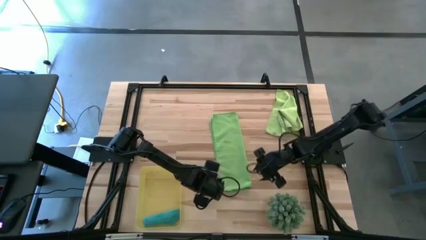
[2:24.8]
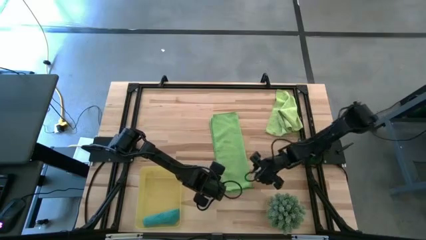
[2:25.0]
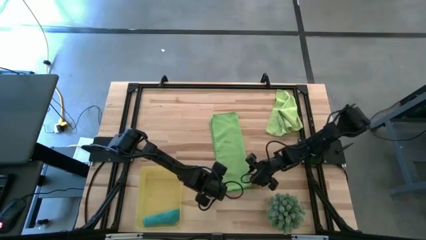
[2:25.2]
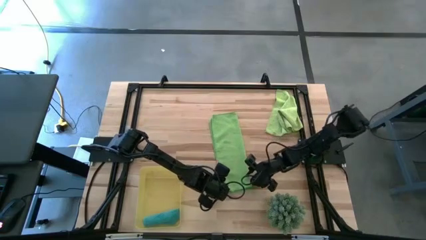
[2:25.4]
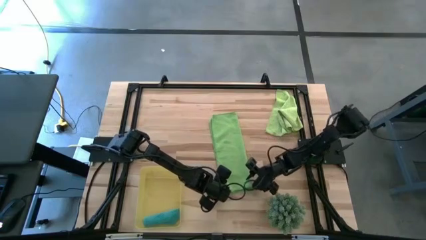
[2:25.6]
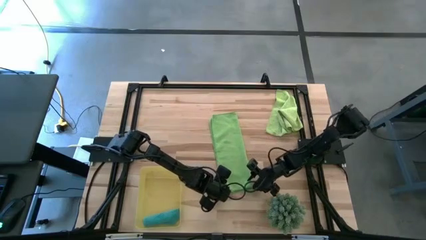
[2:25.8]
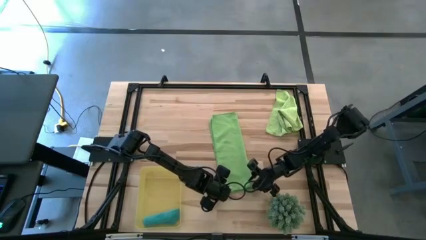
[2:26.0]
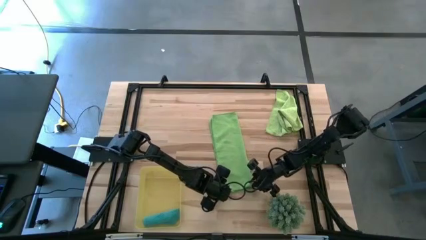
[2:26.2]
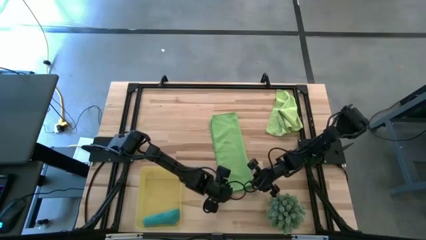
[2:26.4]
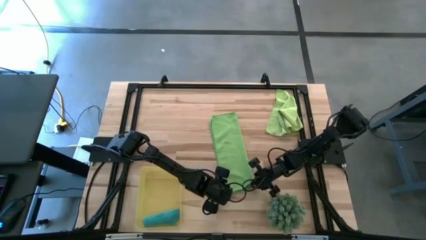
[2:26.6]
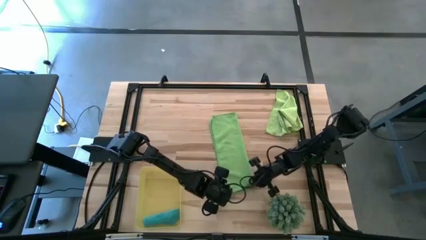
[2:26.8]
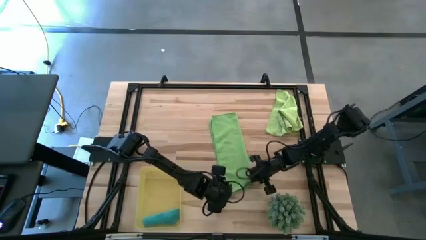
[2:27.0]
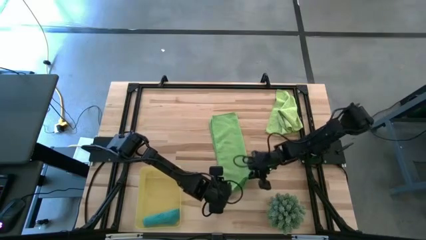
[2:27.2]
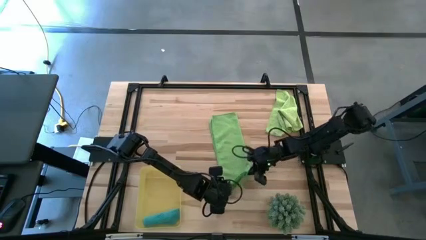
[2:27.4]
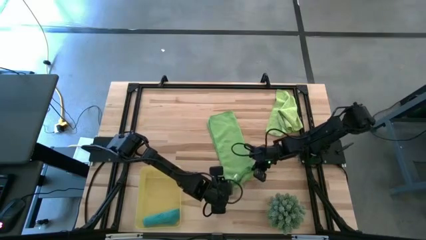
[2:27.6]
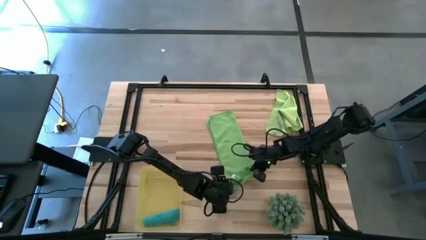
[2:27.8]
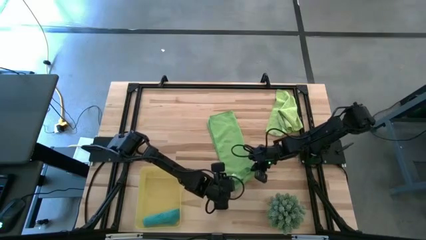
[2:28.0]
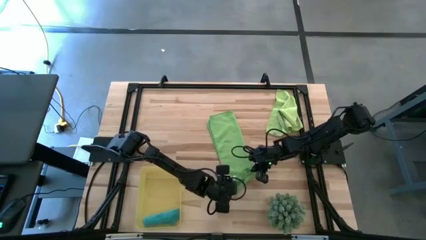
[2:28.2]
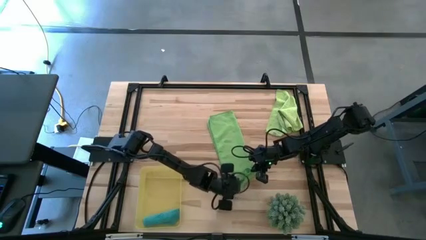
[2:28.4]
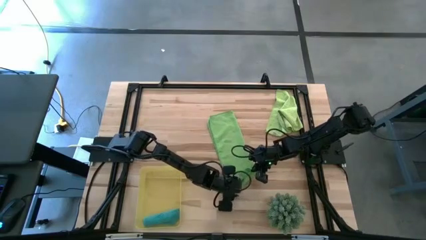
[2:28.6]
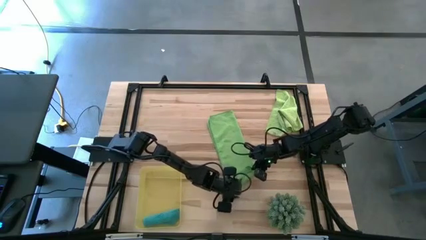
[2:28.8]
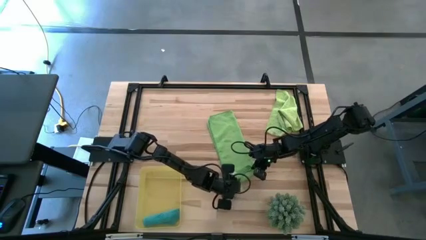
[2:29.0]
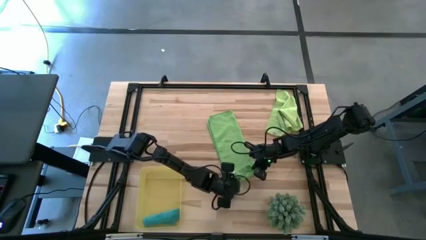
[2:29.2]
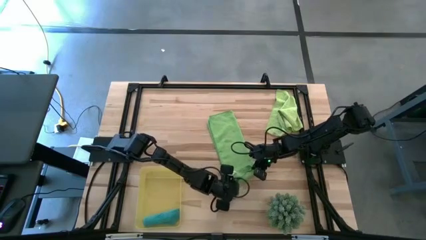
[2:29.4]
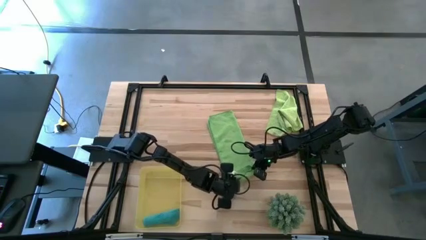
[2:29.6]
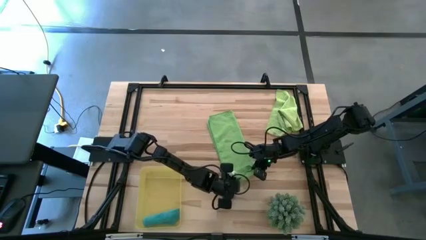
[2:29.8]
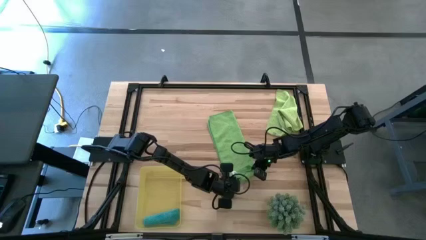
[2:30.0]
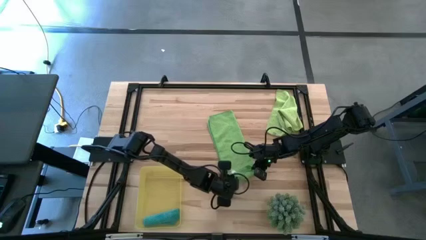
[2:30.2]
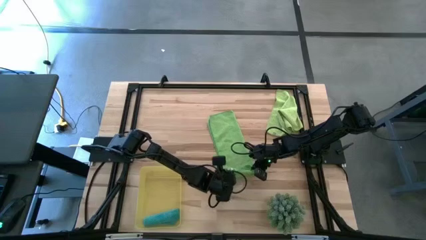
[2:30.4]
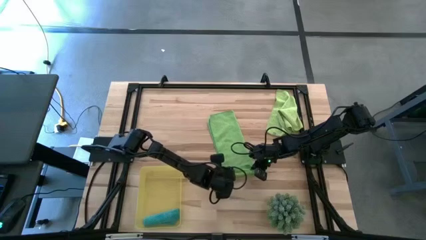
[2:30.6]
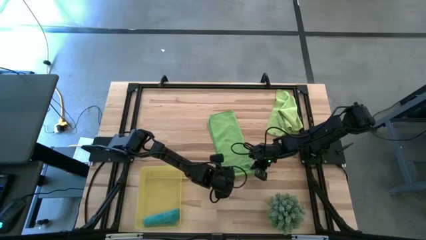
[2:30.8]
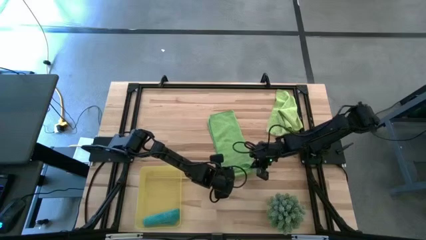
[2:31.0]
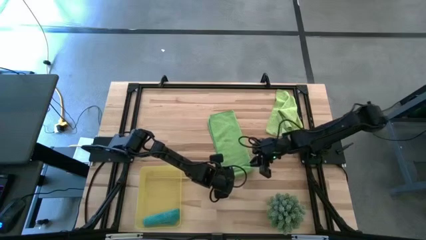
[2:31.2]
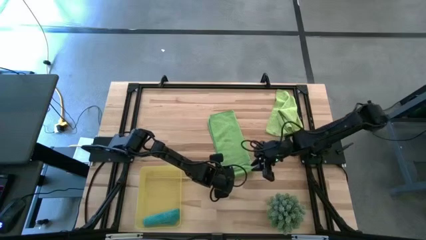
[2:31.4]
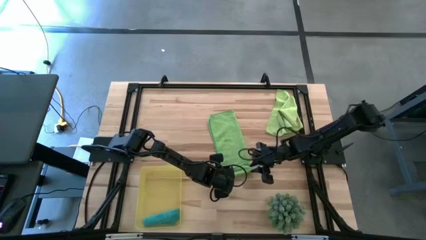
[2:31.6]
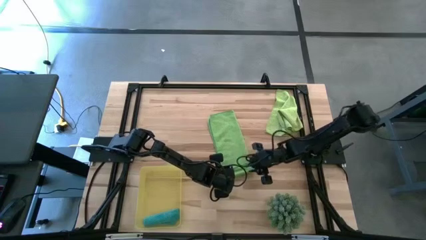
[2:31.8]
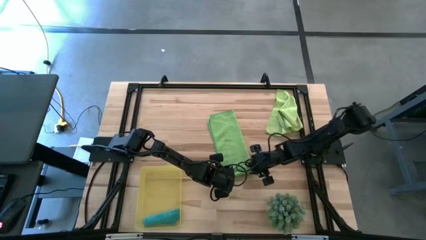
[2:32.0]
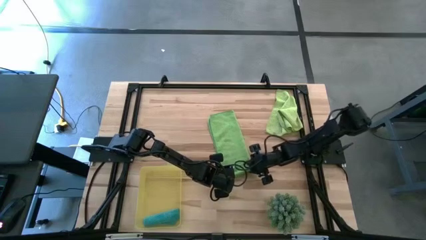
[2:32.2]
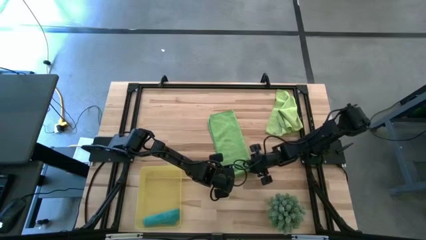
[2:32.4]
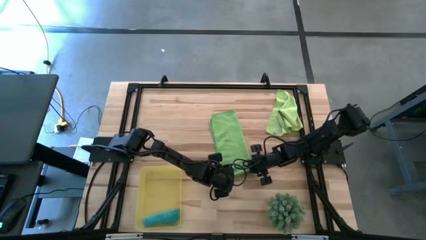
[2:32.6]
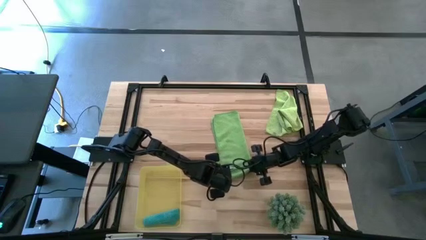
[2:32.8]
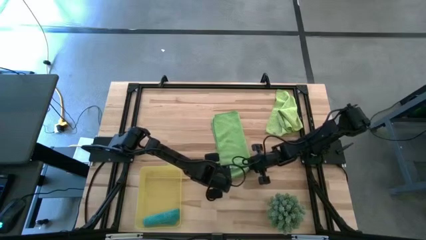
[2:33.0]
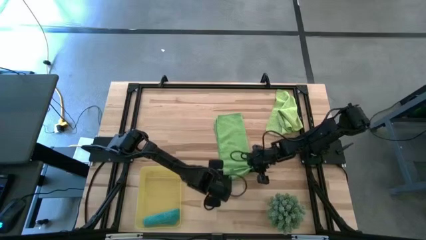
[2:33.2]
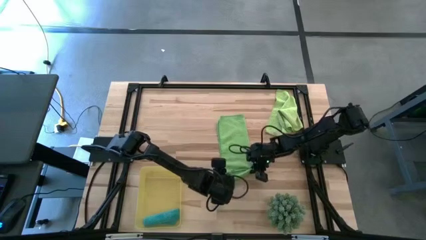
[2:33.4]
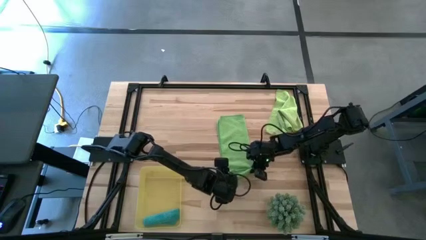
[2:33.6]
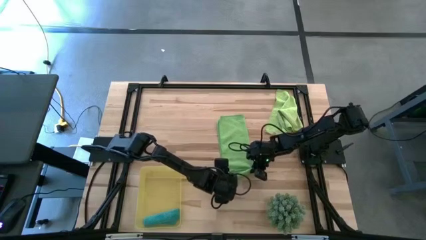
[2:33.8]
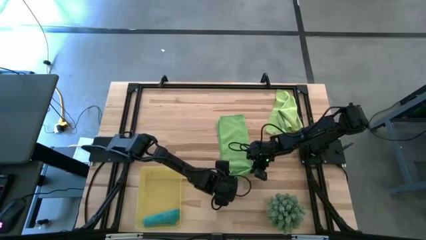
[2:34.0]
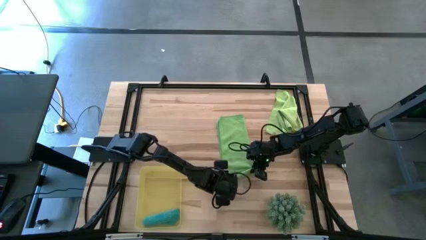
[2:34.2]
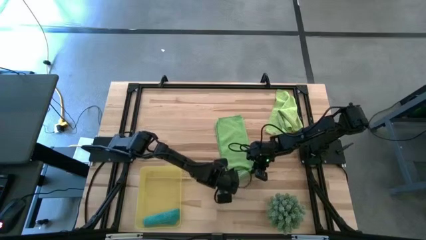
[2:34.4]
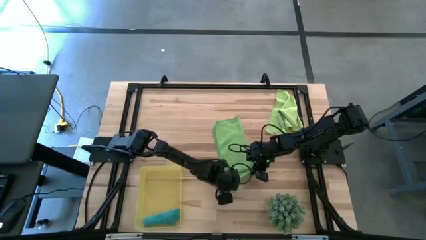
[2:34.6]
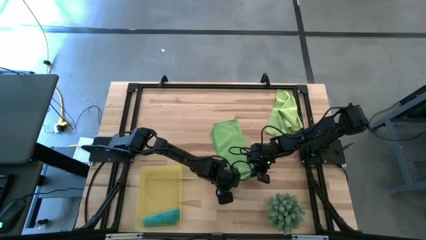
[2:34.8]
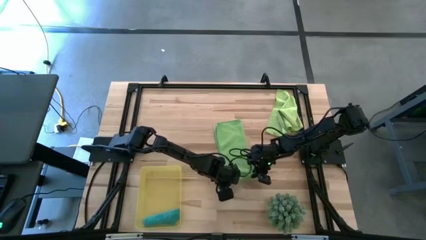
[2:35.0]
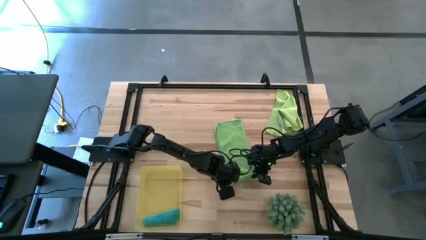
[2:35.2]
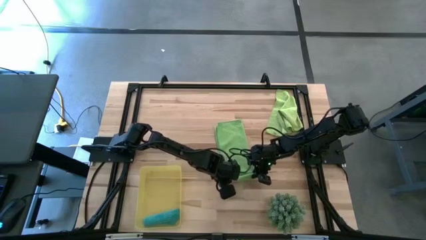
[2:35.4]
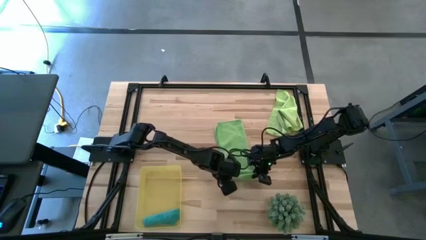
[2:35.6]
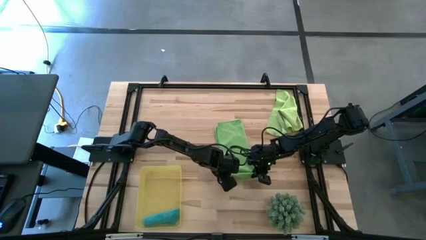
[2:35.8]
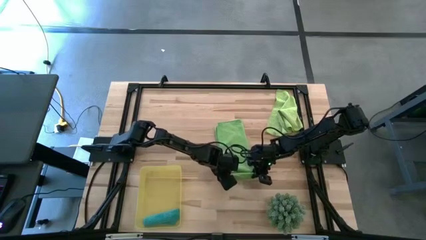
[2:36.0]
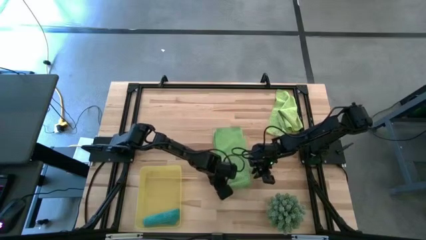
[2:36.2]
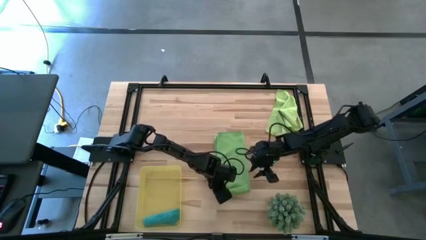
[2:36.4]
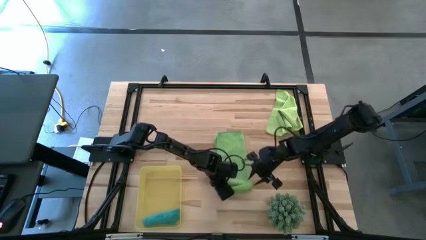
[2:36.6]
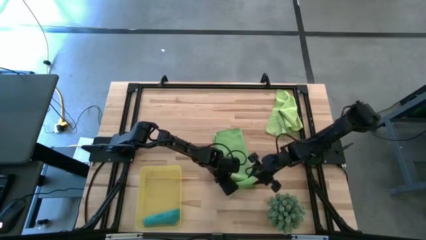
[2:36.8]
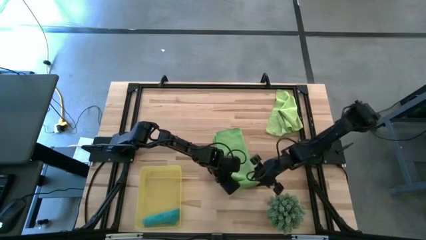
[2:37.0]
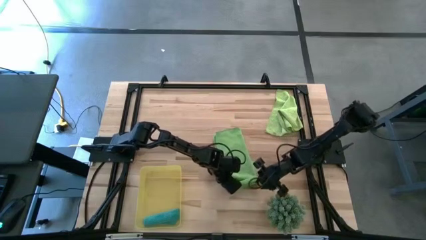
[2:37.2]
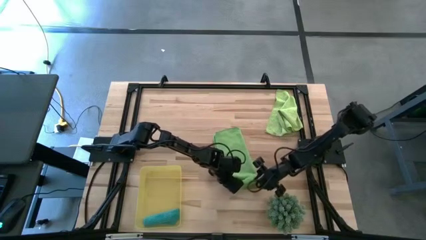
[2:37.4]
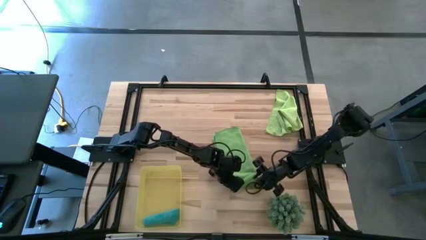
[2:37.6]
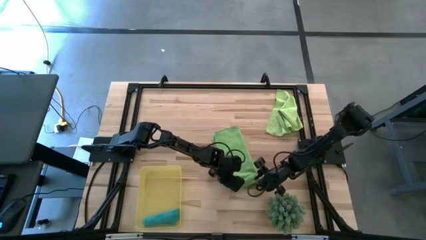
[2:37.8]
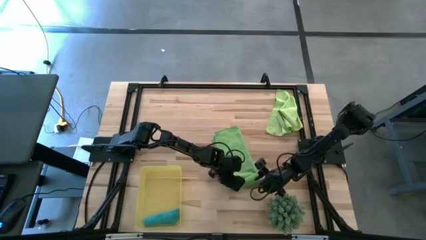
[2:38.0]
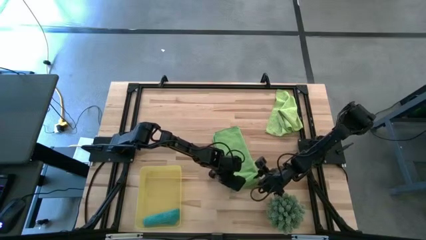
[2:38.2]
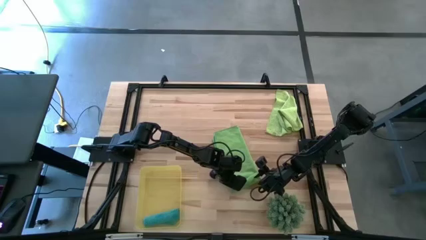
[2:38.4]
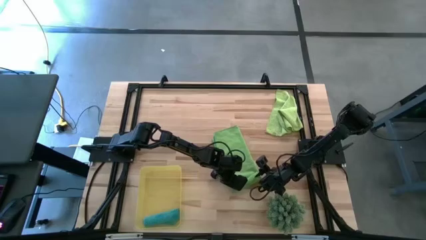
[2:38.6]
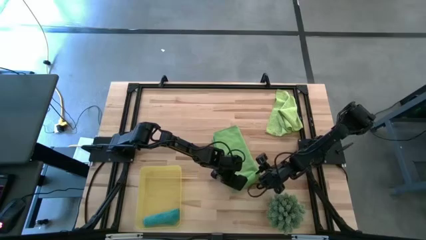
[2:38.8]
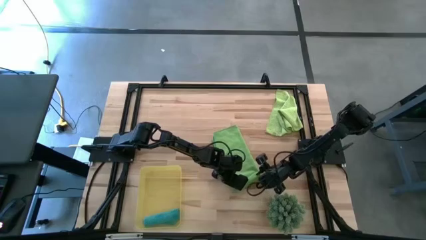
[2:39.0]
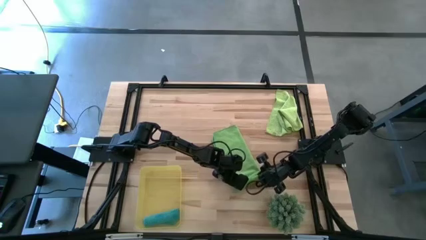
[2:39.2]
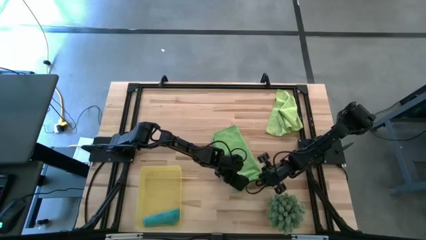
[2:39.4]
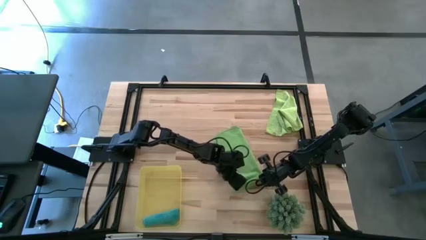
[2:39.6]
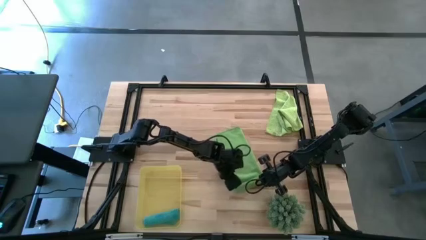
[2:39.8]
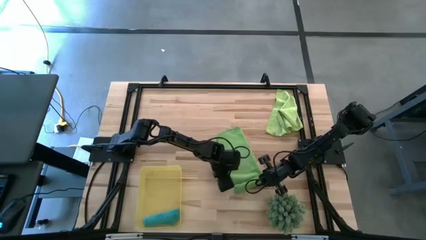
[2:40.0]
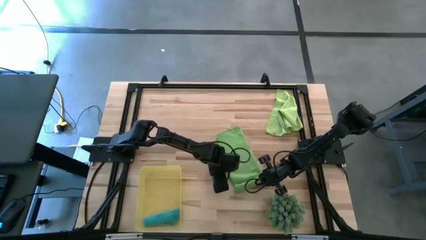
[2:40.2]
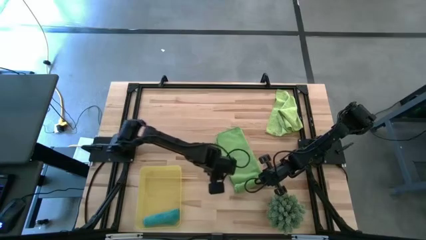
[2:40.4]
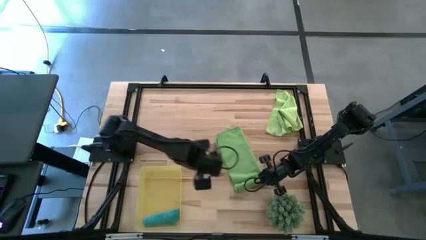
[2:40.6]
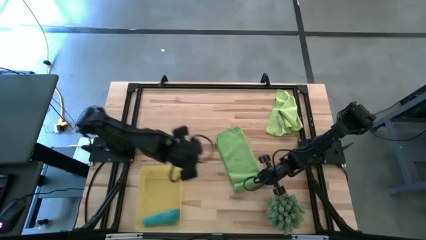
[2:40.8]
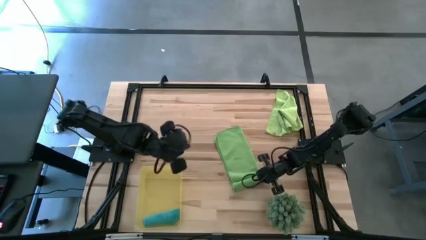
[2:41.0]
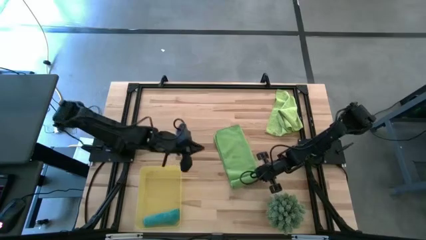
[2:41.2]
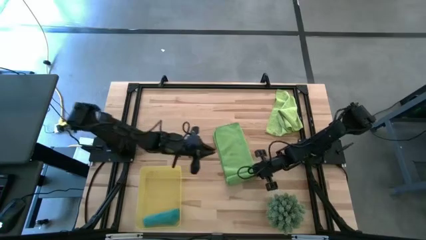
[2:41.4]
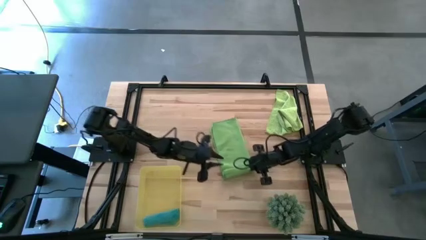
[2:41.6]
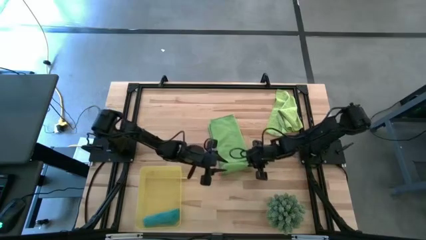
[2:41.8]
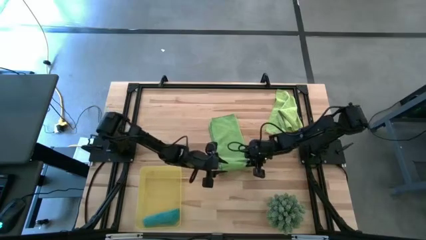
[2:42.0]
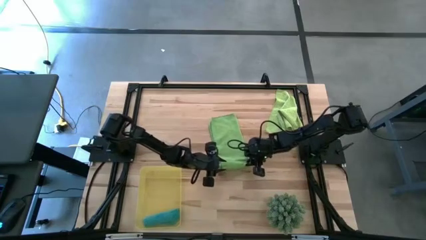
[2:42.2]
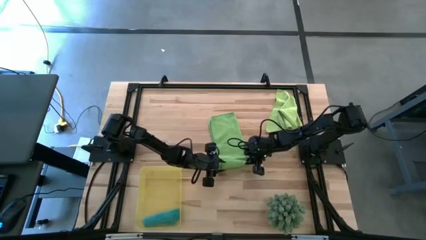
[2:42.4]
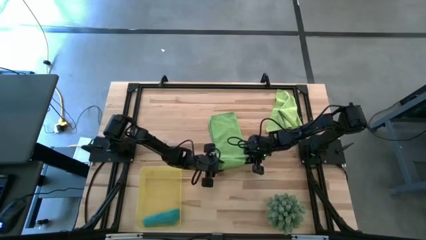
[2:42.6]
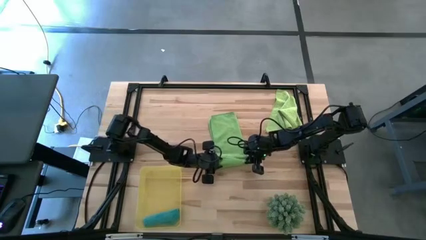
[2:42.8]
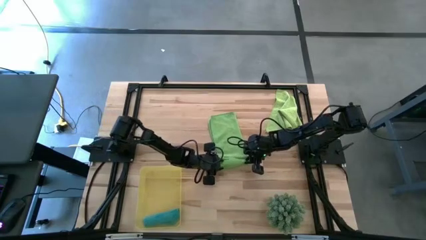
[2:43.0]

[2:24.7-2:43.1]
Task: Roll microfiber towels into tight, uniform cylinder then place into a basket
Roll the green microfiber towel
